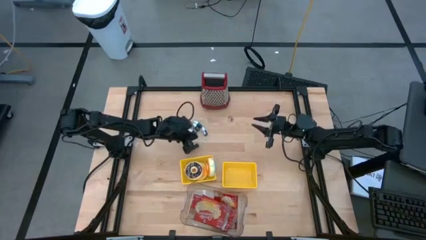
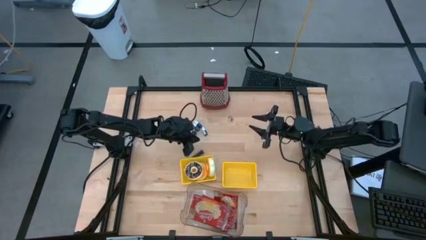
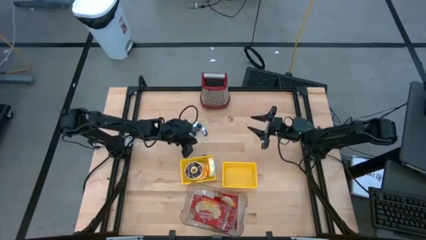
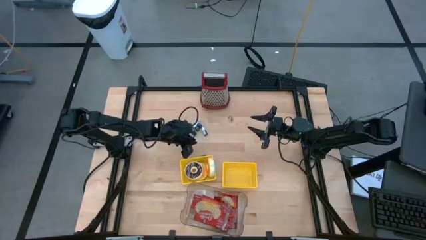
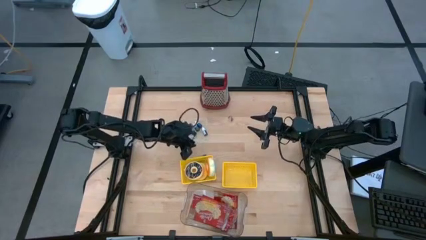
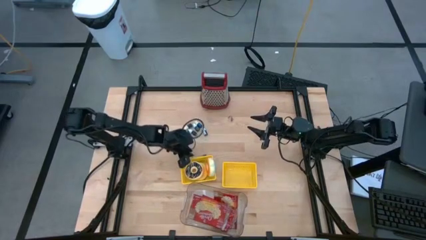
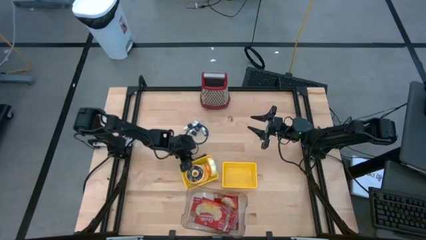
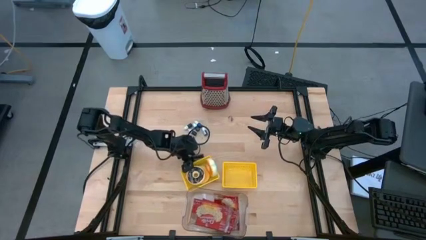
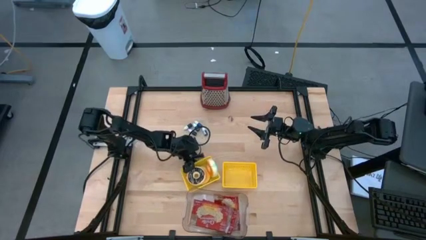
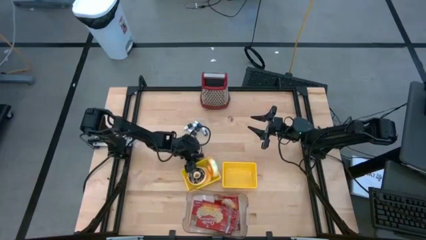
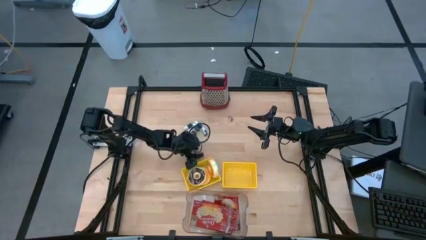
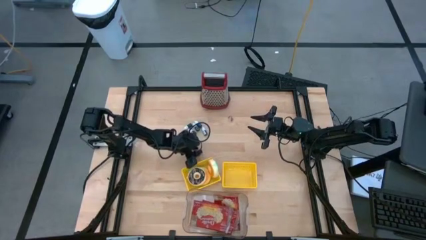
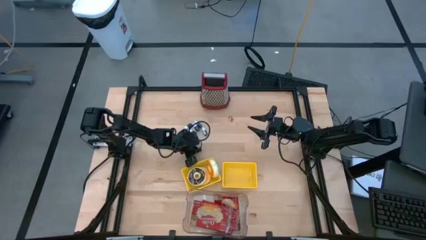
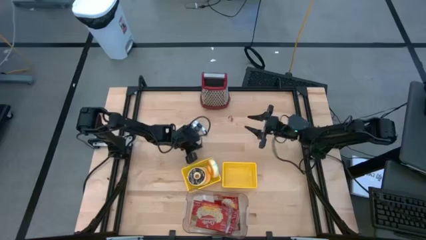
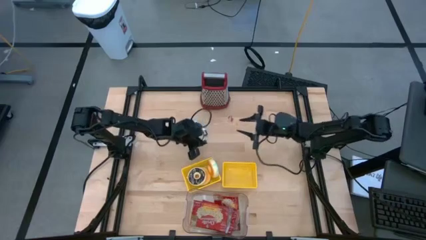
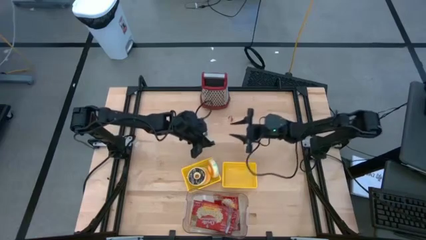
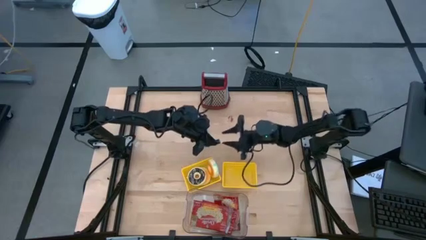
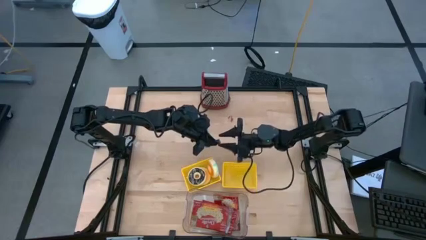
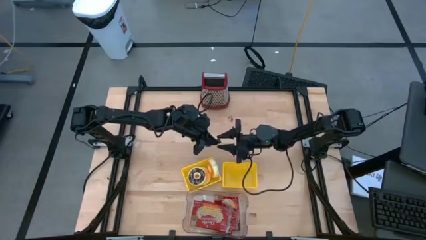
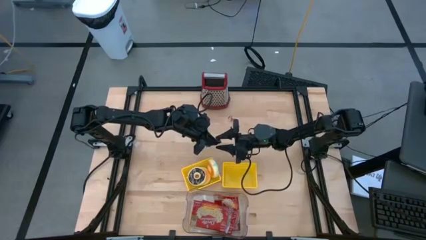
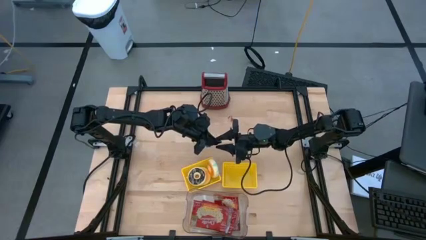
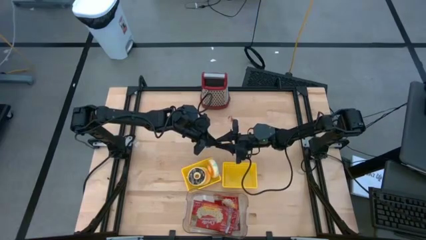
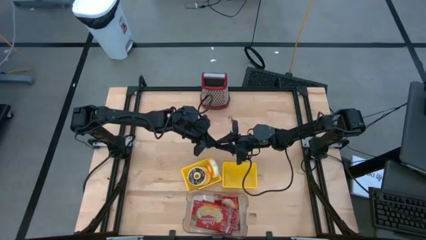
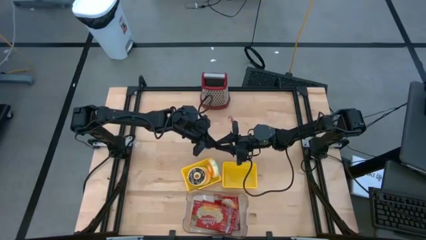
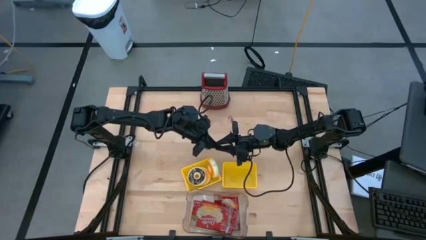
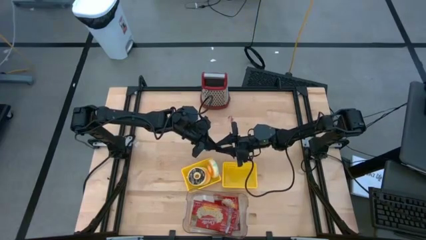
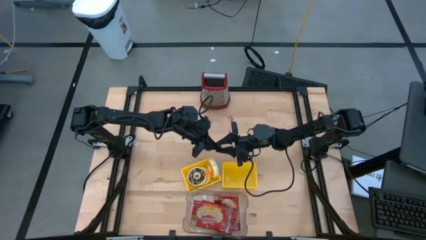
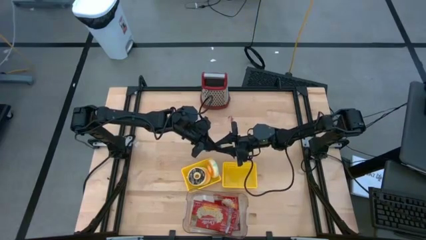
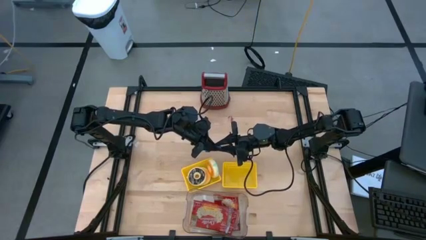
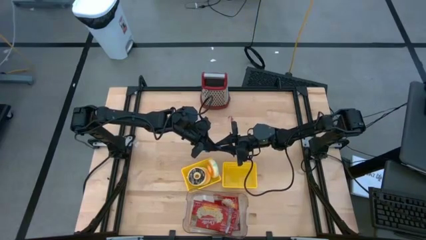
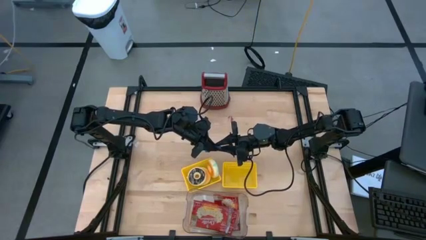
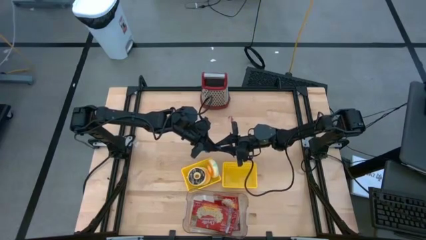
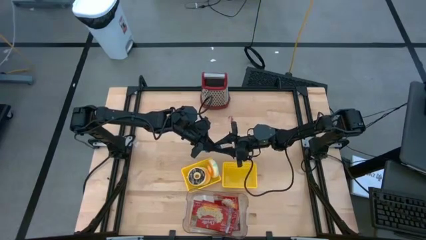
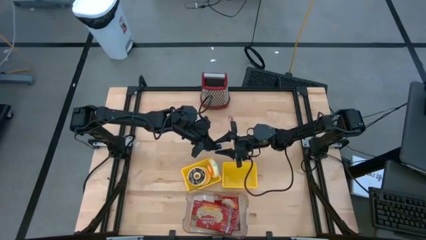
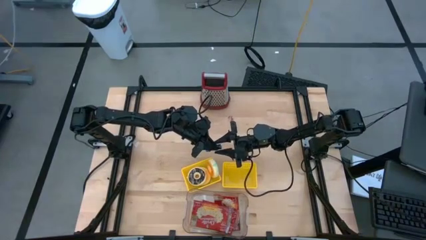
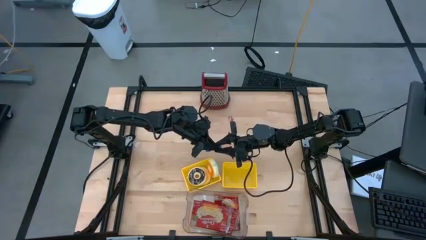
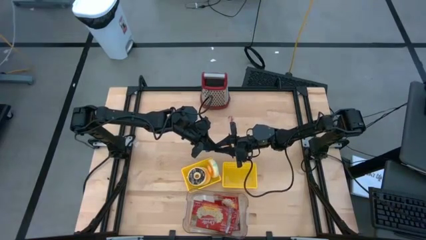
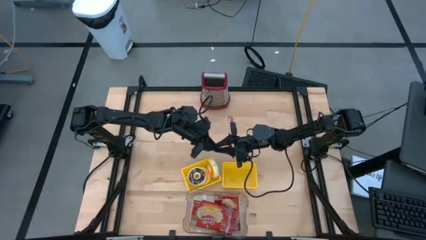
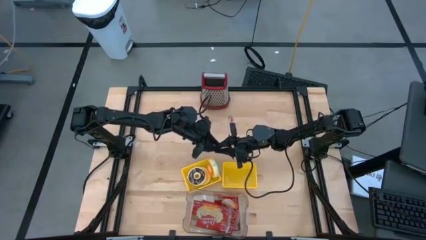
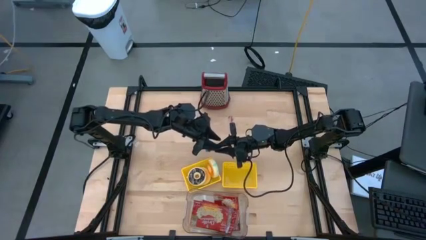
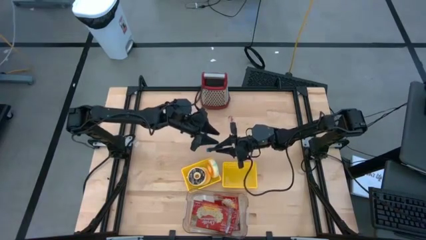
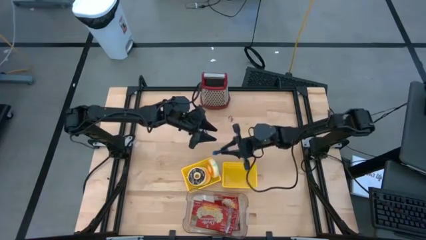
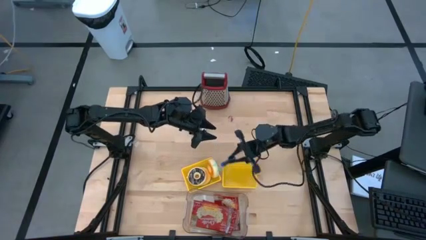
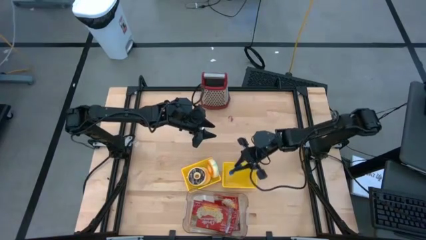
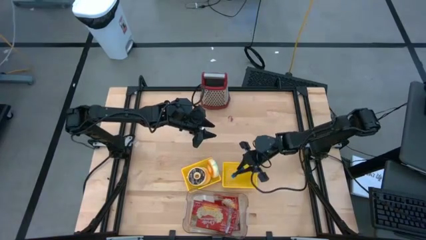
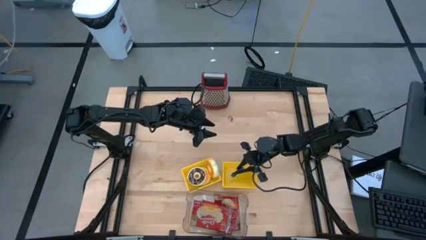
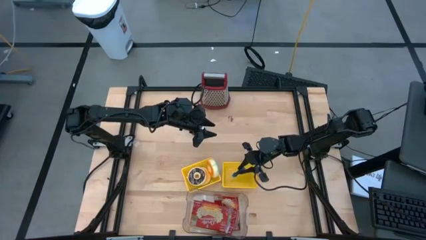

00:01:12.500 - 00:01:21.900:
Put the large blue food coloring bottle into the right yellow bin

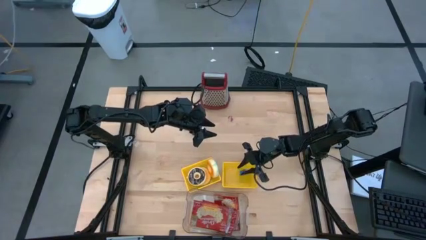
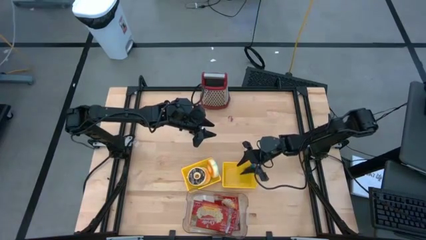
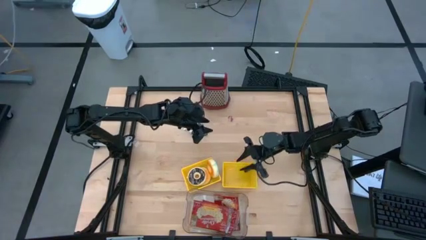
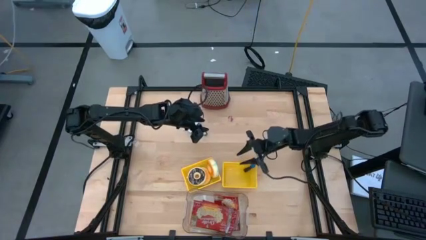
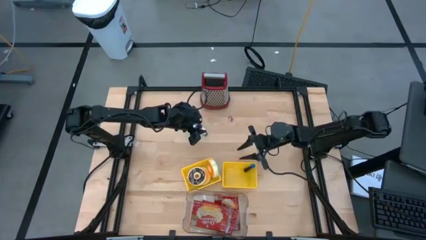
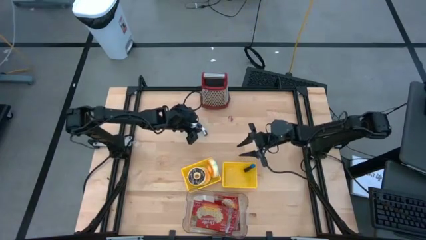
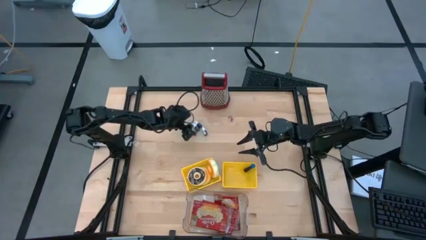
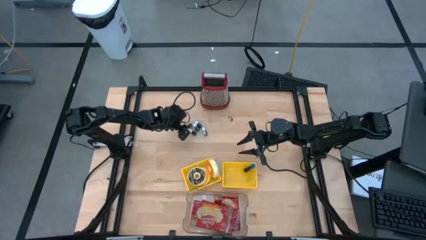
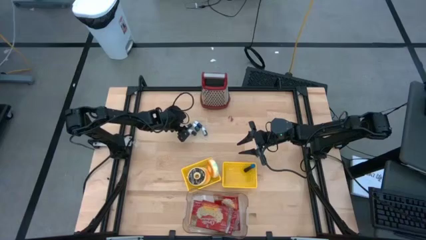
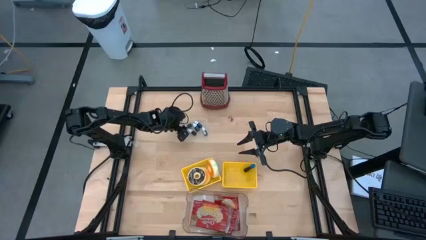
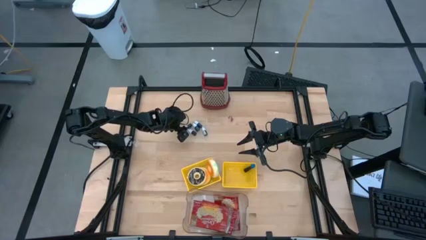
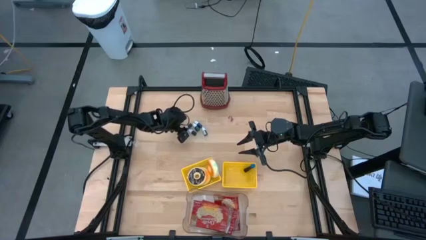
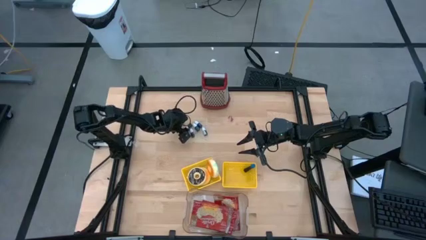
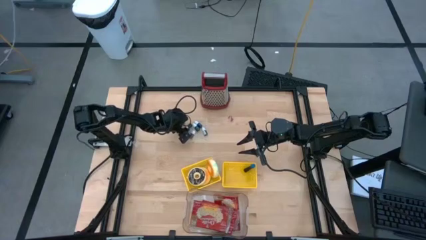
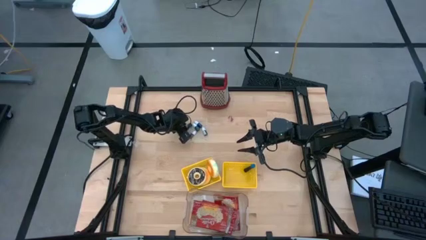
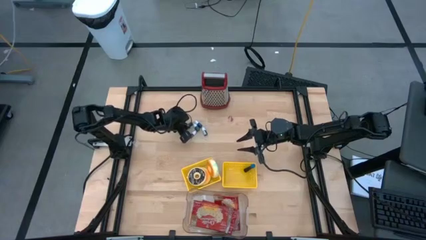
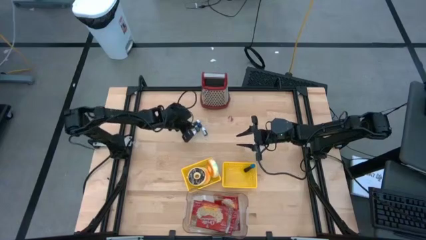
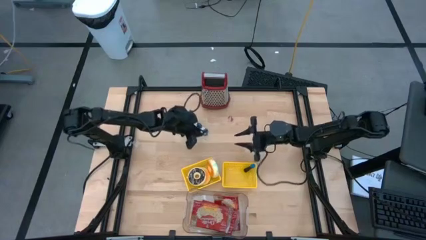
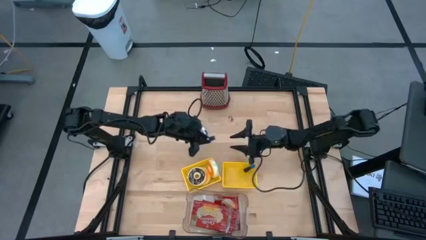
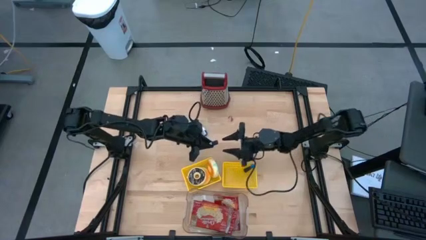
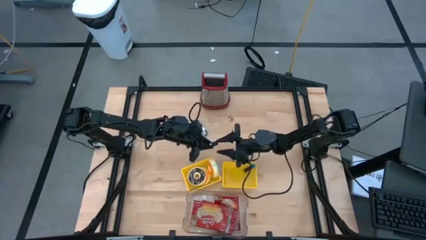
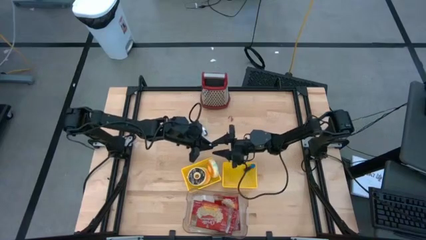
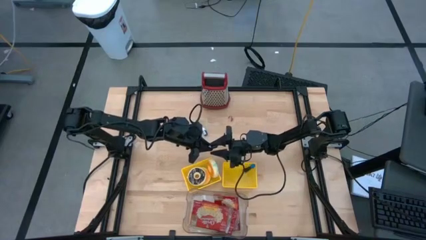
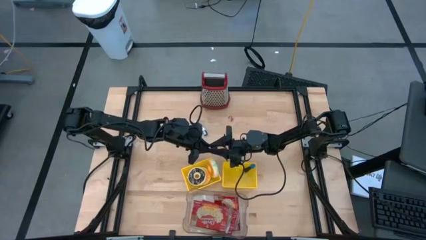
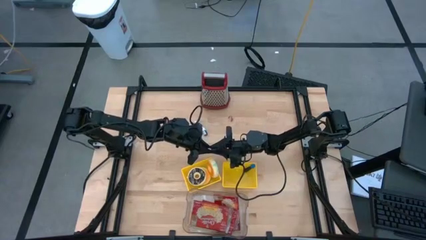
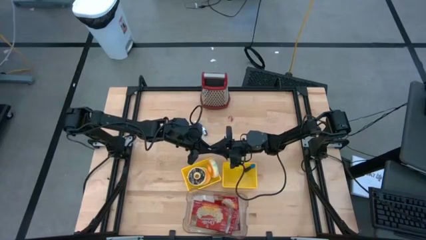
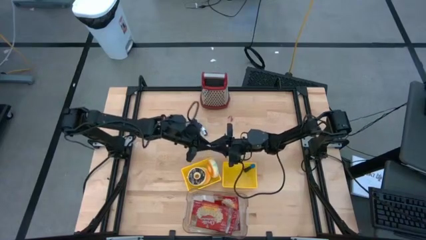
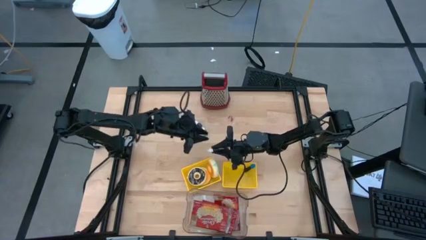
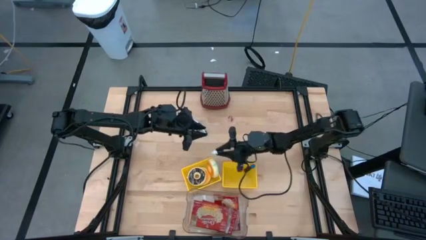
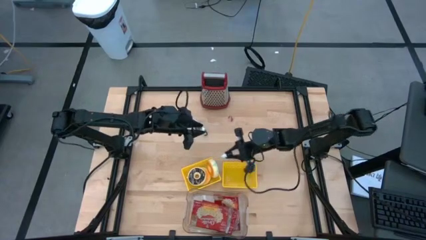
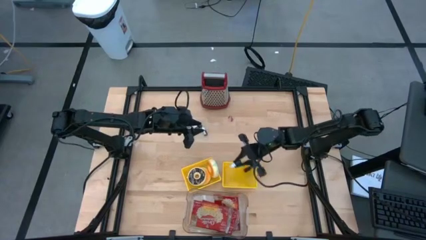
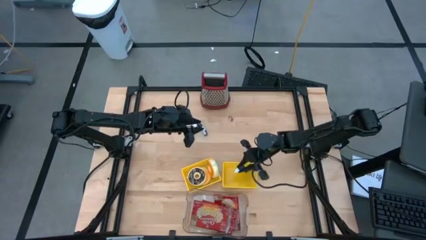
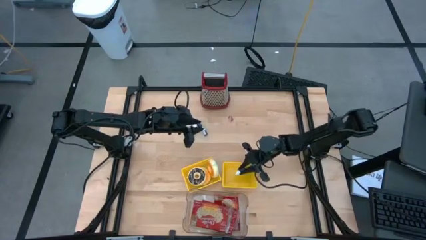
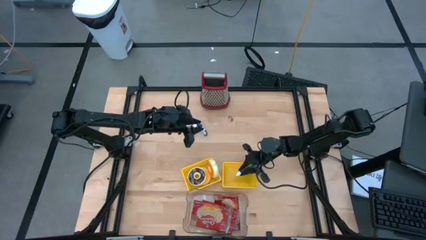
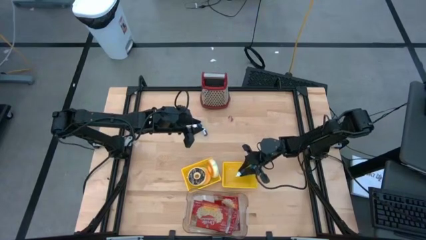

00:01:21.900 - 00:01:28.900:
Put the brown food coloring bottle into the right yellow bin
